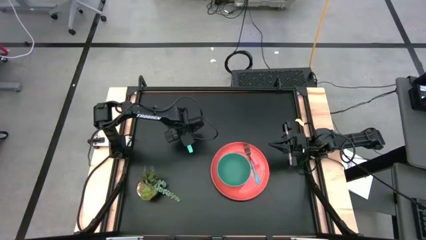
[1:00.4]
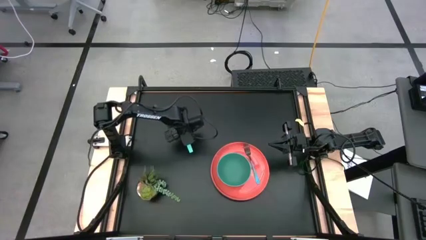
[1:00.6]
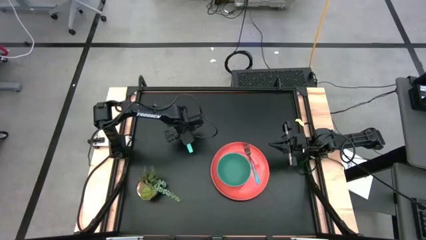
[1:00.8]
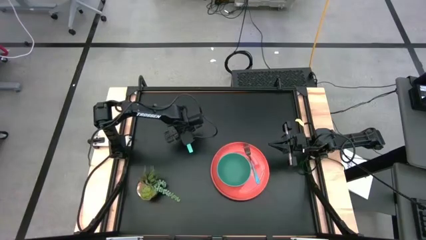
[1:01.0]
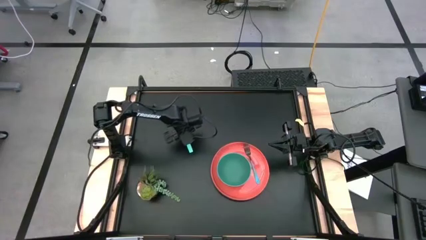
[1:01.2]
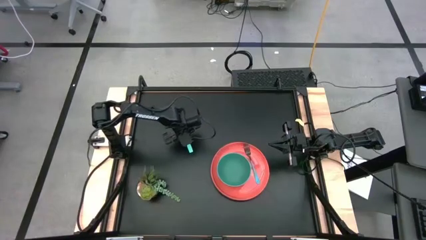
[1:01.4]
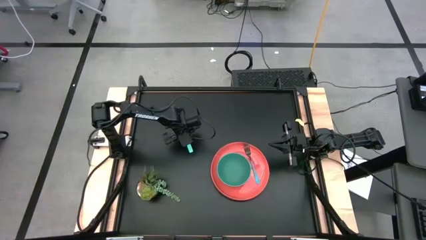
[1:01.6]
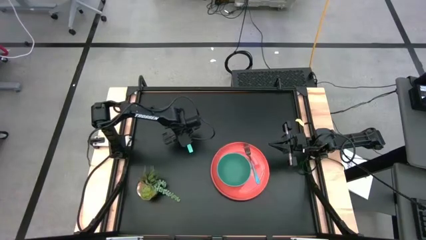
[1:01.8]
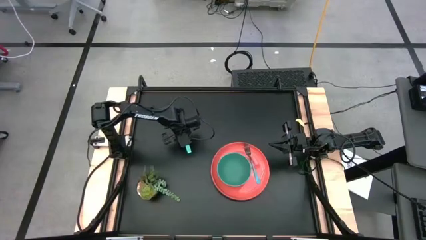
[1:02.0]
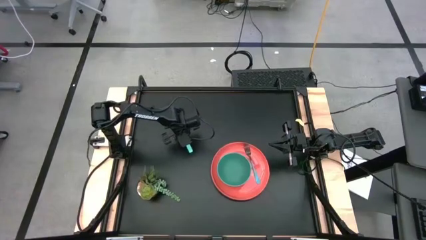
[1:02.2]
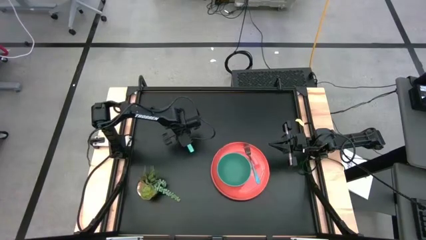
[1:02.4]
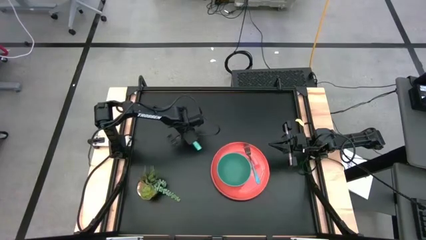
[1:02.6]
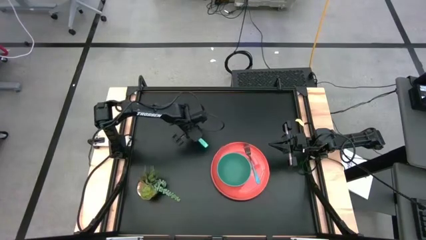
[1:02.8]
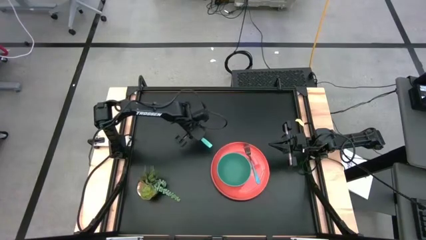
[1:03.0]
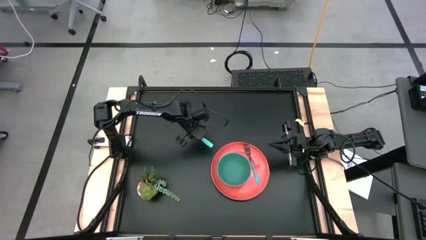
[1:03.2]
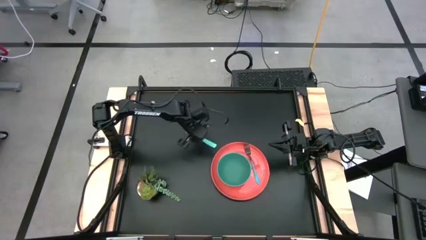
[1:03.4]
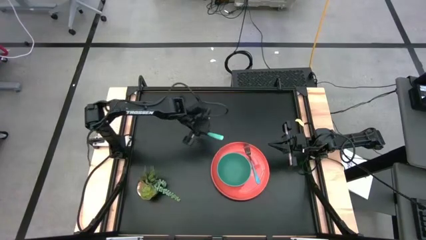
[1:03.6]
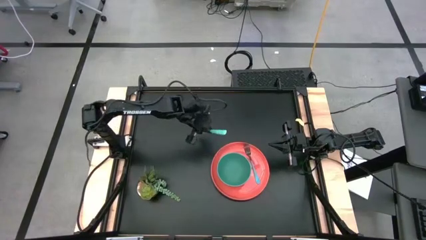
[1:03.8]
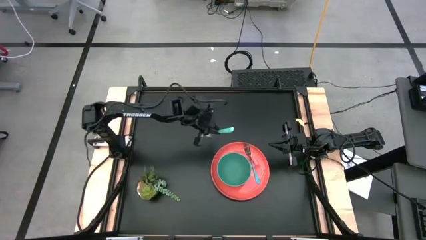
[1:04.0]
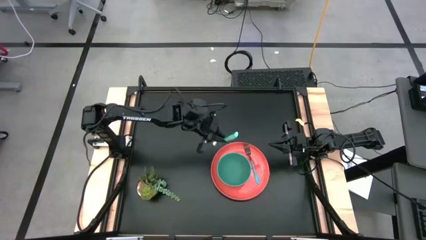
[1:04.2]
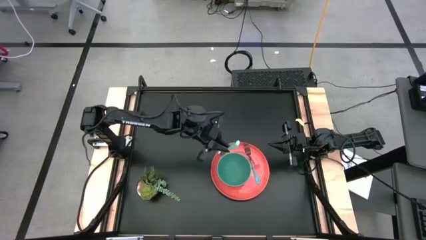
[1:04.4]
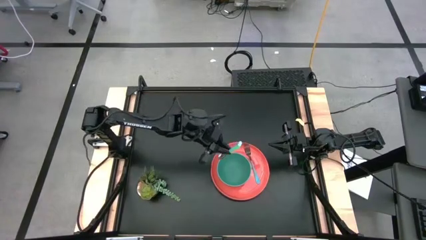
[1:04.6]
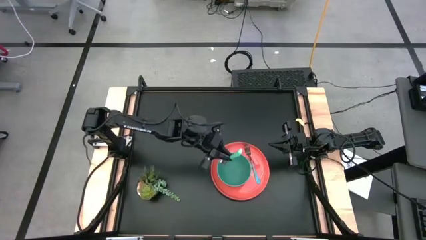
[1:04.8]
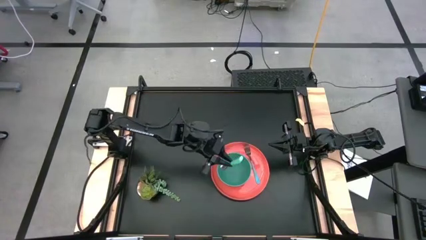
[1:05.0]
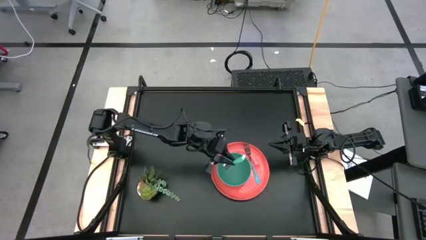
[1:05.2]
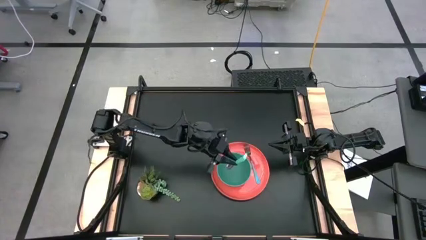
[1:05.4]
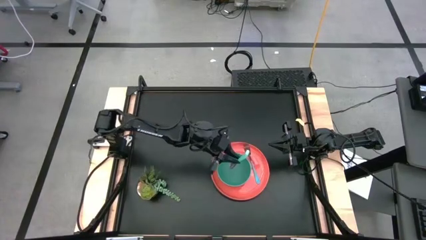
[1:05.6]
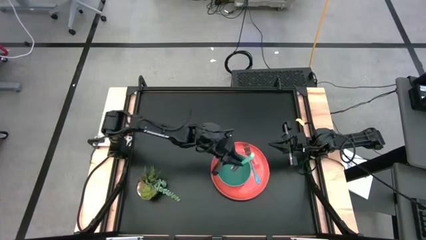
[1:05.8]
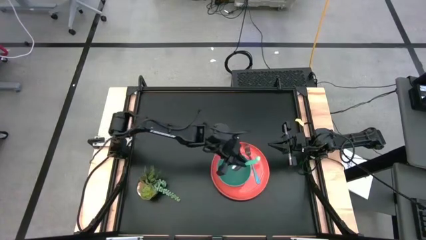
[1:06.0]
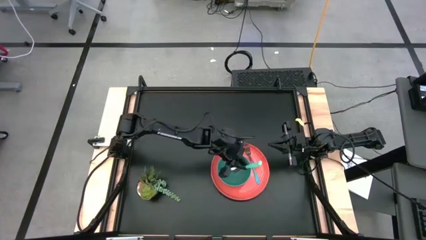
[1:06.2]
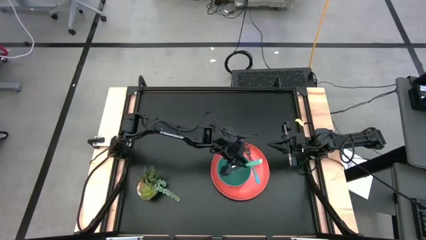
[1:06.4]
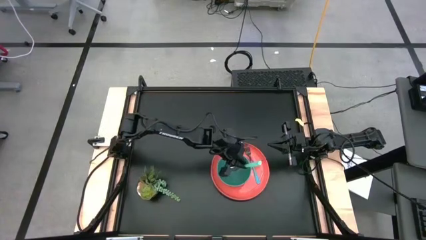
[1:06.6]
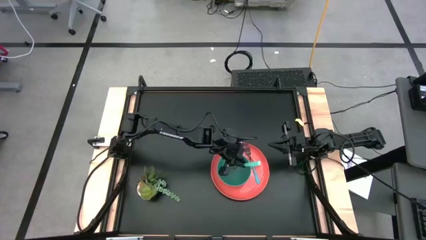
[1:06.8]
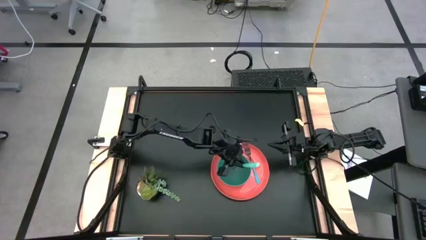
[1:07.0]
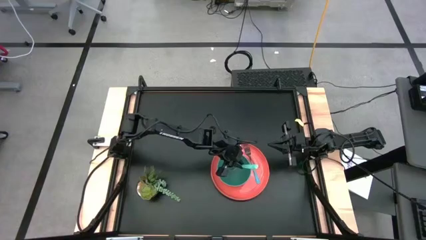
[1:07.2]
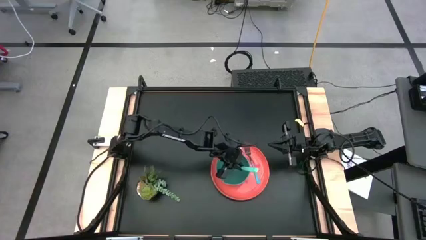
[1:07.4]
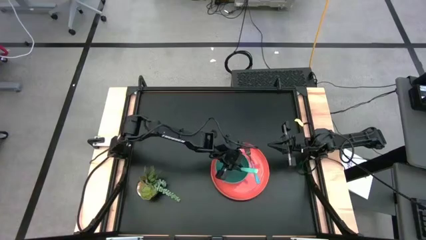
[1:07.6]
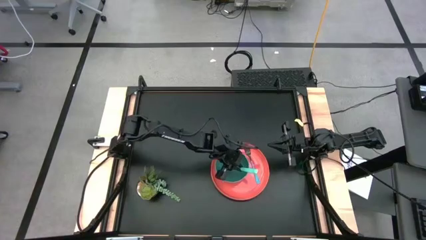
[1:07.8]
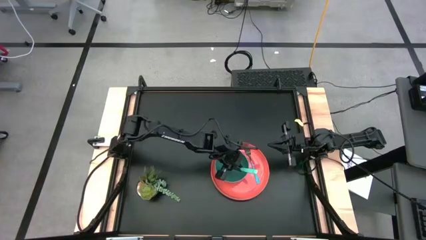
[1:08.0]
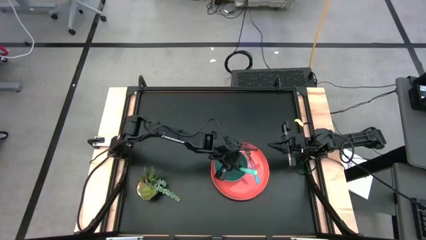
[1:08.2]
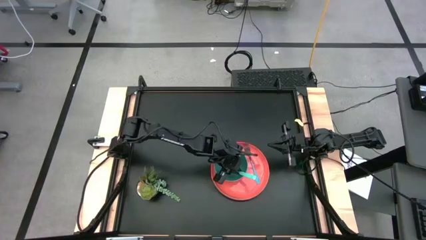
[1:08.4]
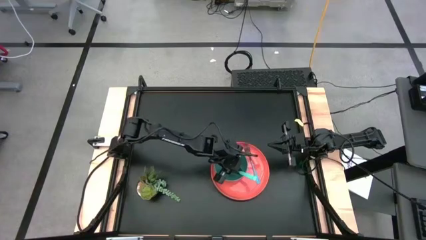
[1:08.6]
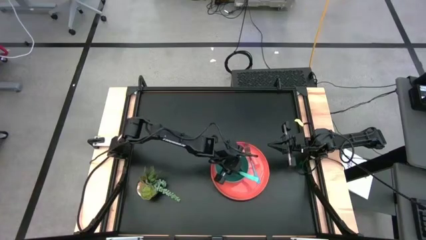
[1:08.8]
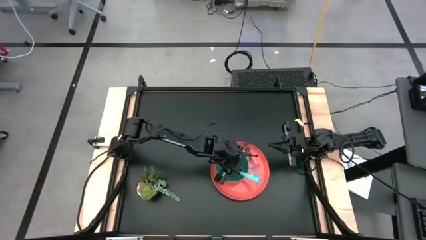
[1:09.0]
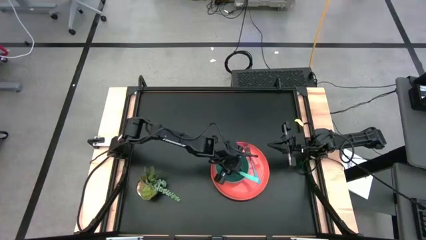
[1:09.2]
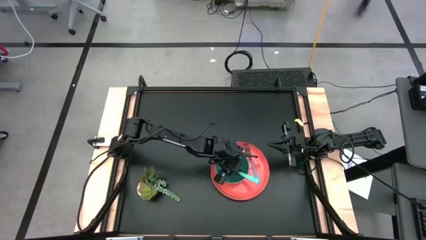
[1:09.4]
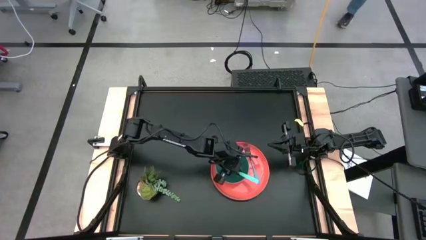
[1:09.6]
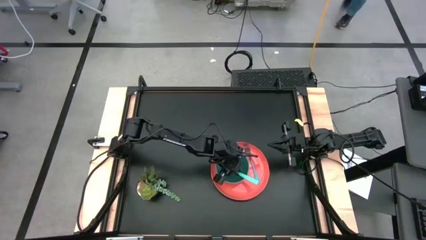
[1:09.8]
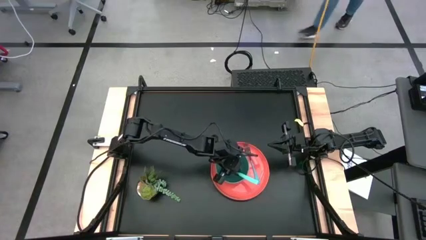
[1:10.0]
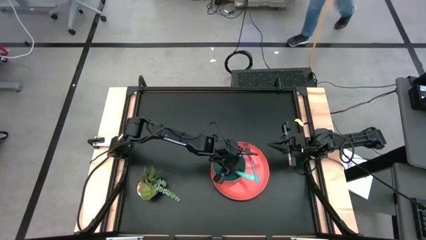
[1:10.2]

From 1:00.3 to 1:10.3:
Task: Pick and place plate/cup/fork/spoon on tray
Put the spoon into the green bowl

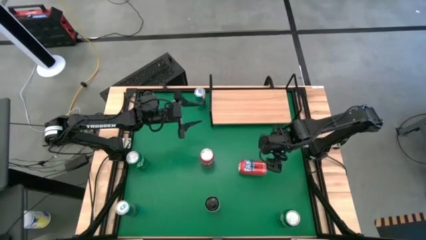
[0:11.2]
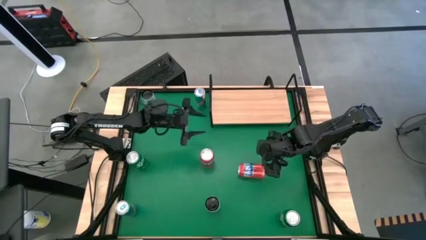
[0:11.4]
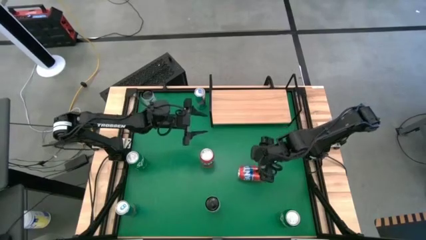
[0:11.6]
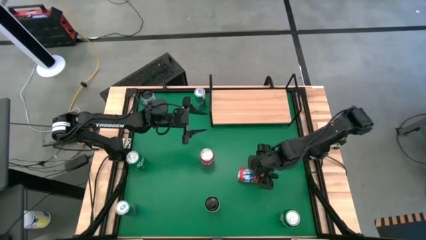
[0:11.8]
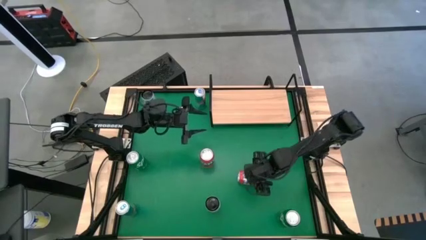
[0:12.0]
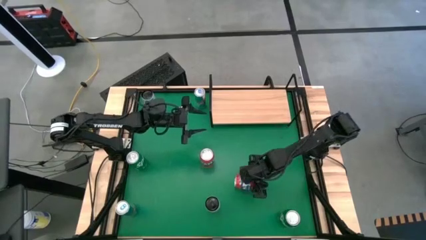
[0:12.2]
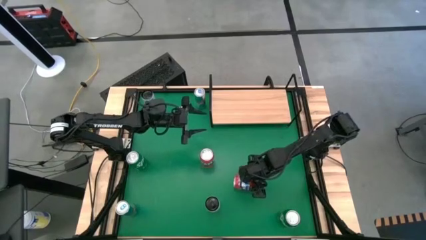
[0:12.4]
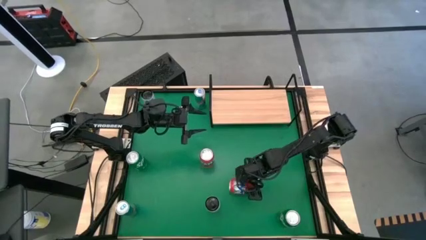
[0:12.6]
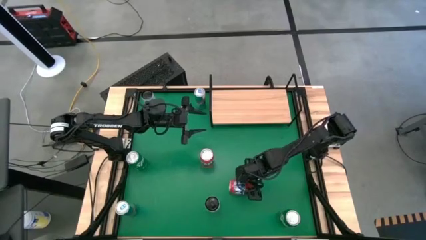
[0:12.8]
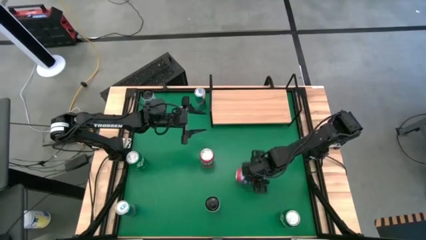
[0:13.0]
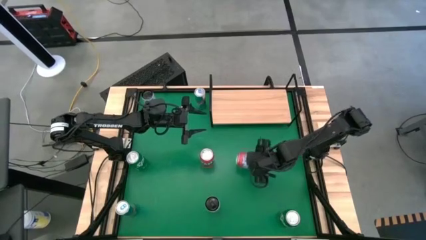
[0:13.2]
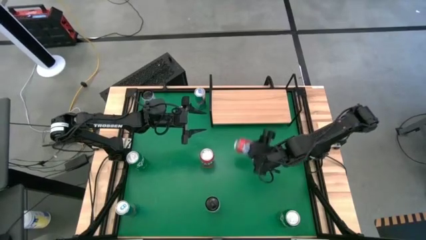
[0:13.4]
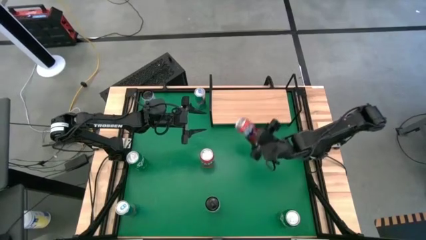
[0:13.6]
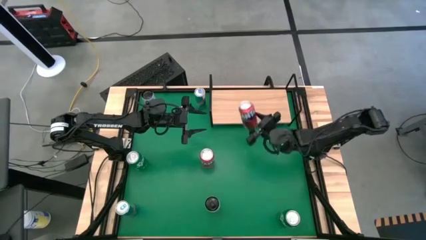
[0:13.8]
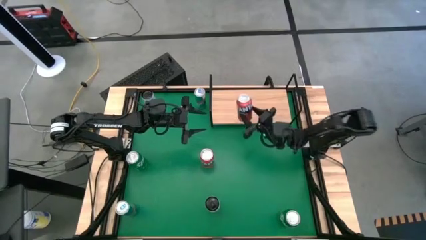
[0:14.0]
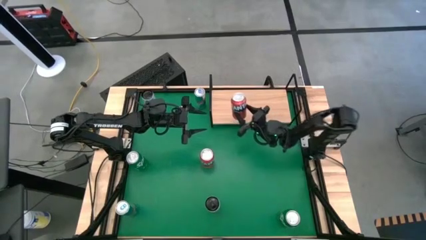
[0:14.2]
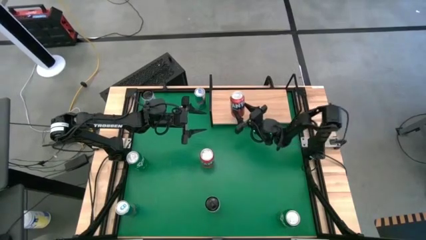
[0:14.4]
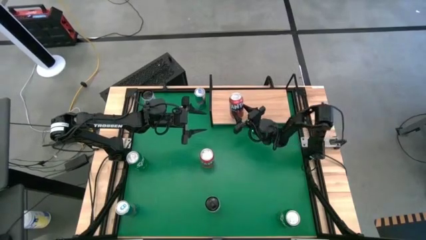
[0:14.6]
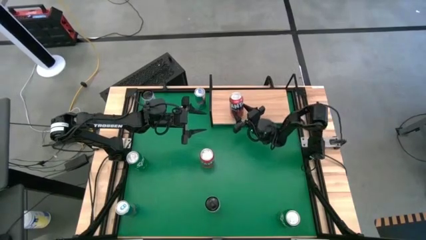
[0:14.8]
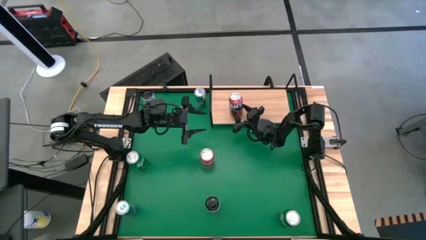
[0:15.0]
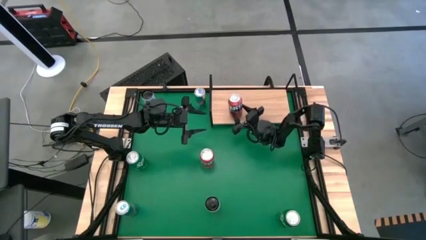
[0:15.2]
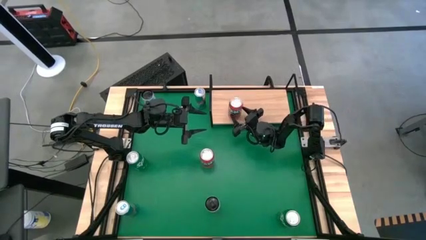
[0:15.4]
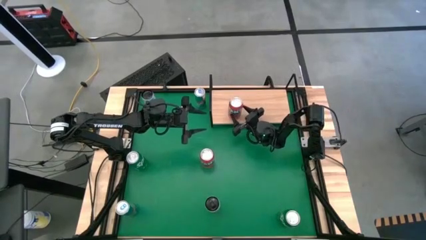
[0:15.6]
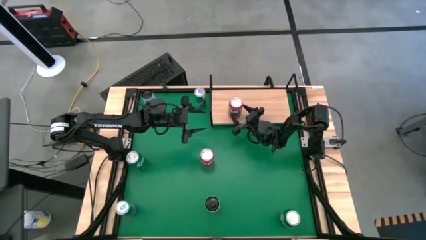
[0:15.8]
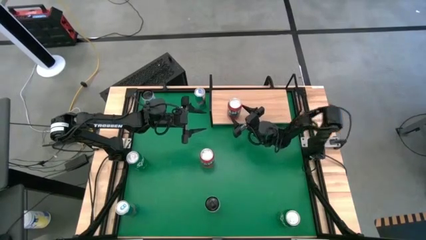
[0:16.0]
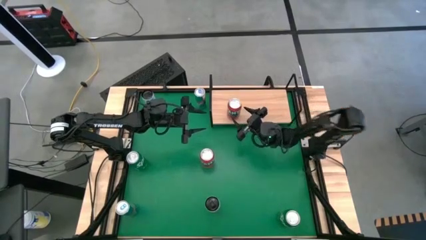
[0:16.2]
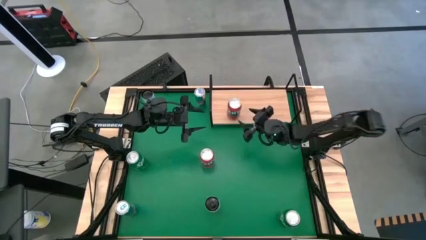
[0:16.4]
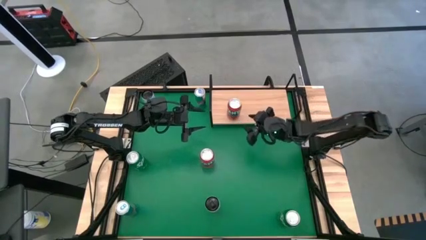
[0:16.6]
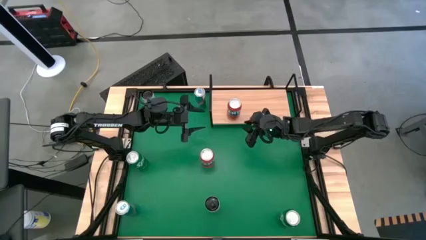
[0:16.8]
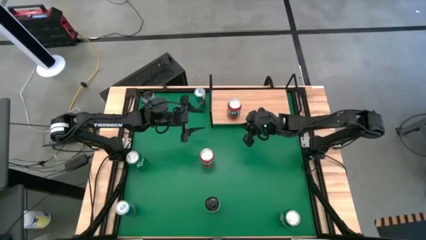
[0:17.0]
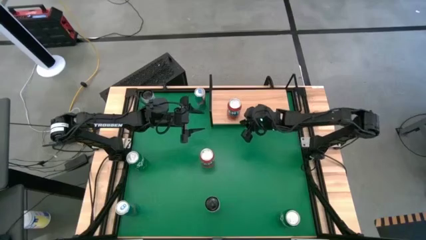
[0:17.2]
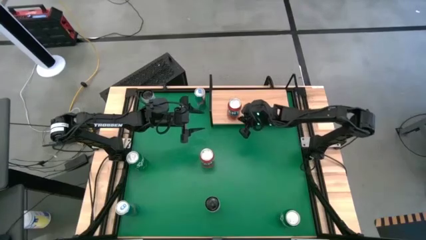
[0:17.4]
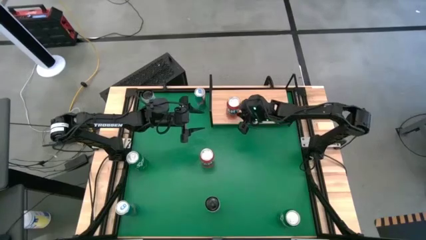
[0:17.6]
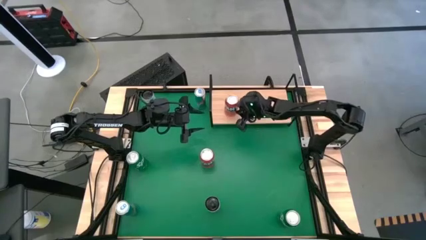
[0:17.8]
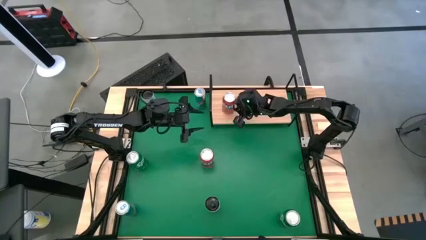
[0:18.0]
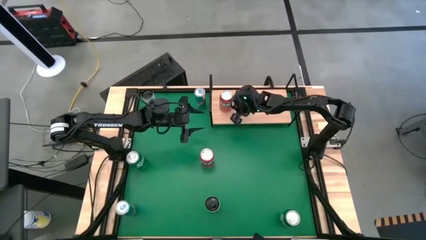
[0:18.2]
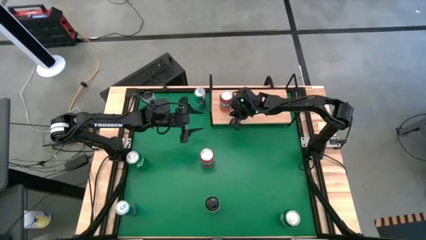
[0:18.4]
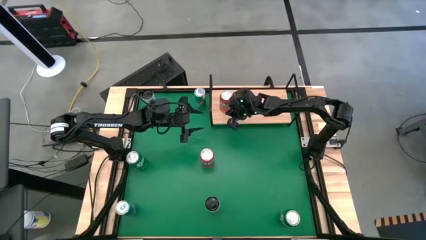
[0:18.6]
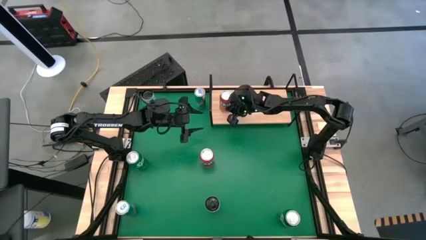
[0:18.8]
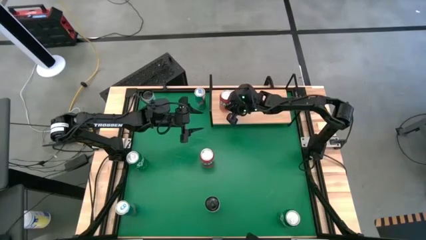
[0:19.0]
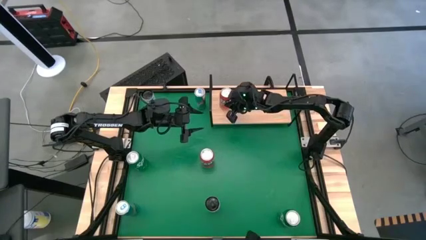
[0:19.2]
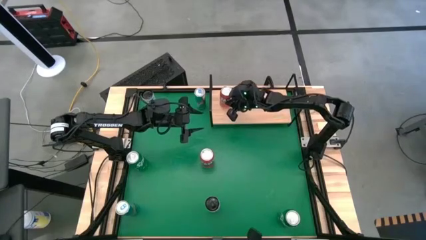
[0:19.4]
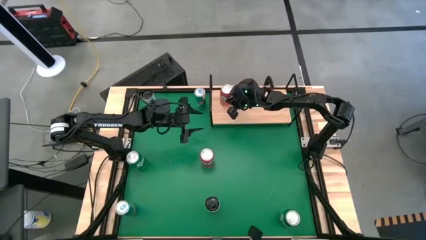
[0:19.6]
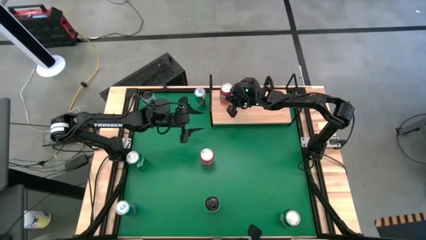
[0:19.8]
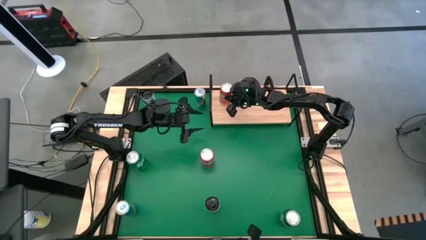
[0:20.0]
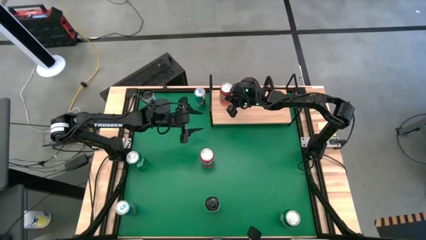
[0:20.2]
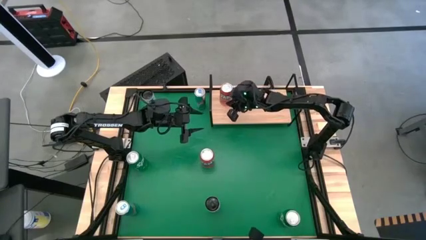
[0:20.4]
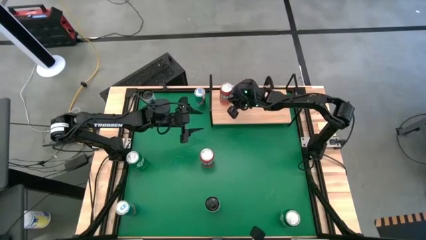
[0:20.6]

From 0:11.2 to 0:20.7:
Task: Place canned beverage on shelf
Put the right red soda can on the shelf
